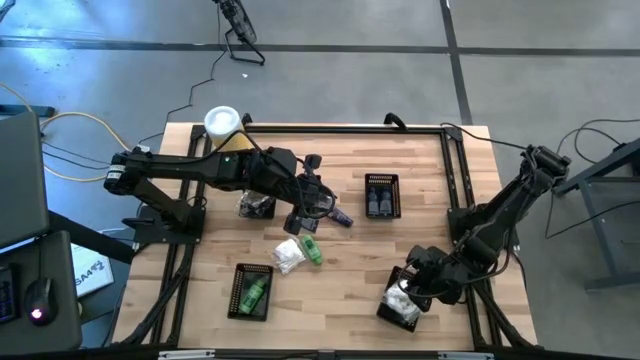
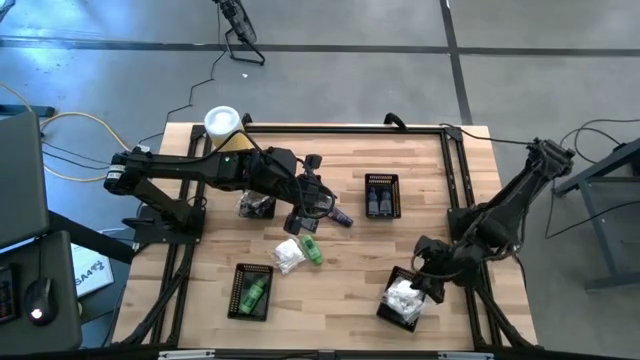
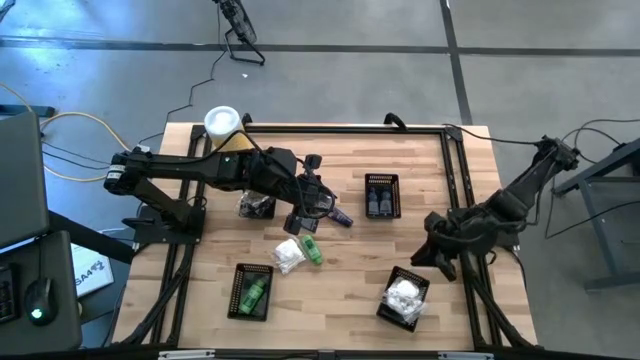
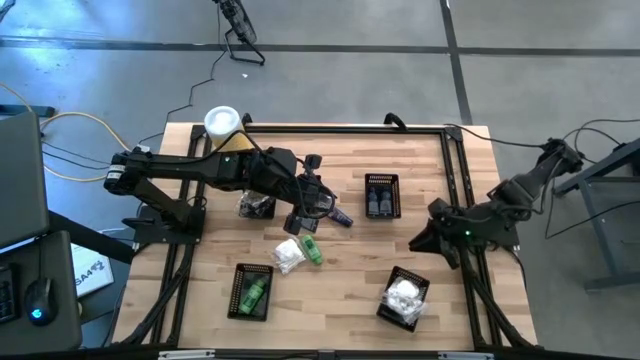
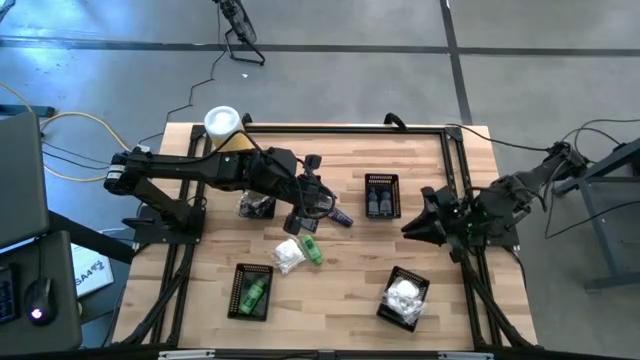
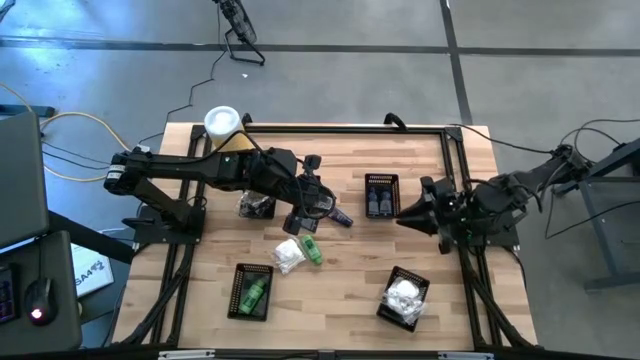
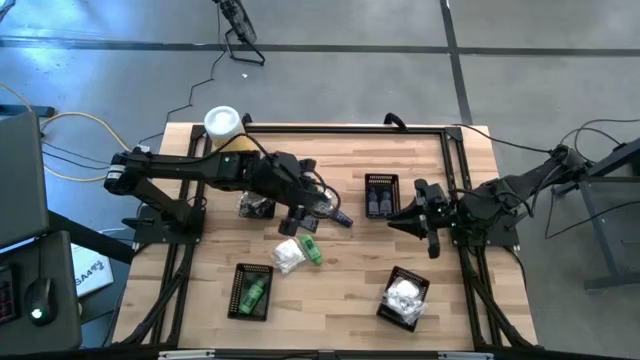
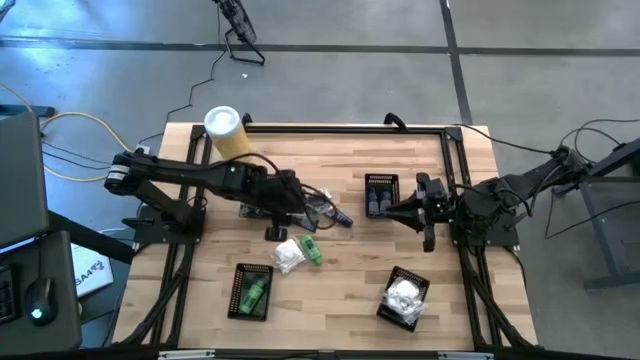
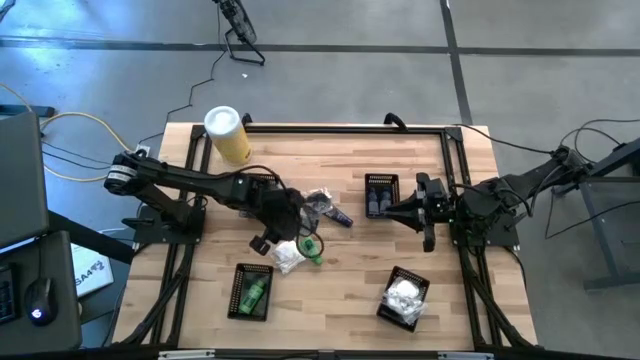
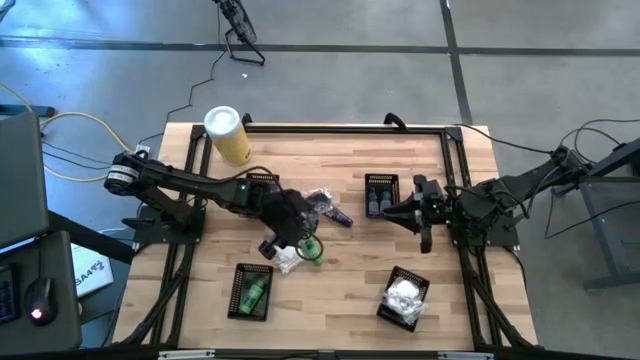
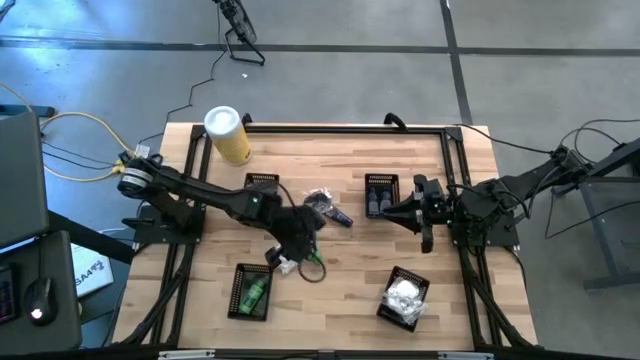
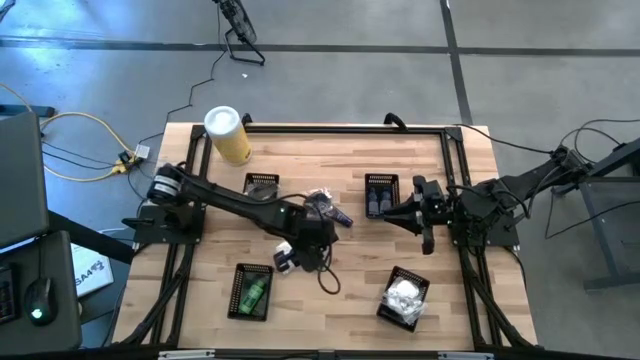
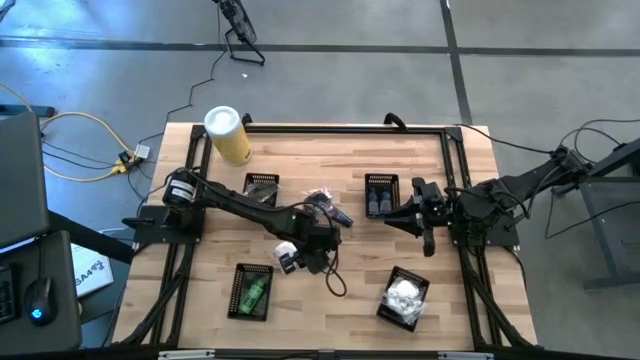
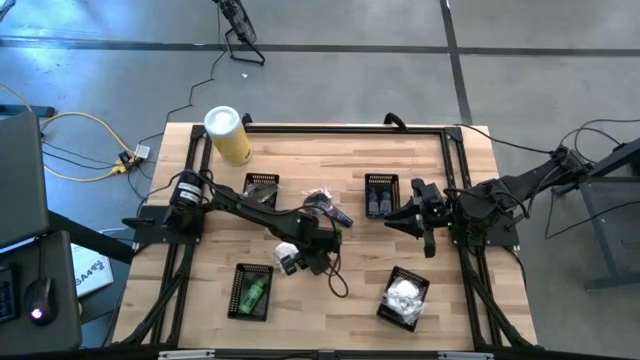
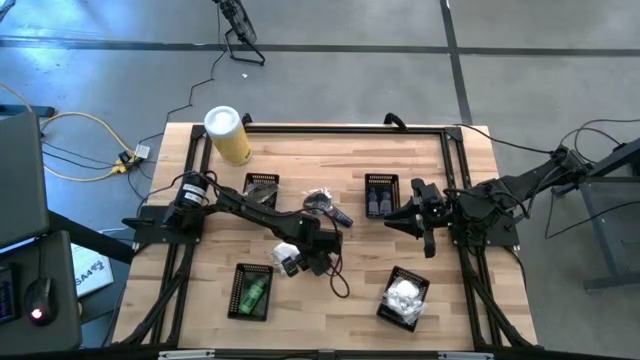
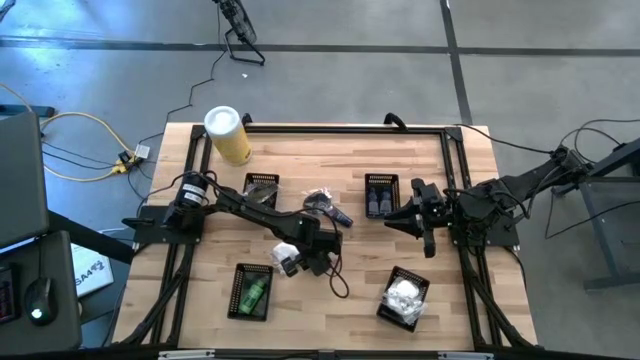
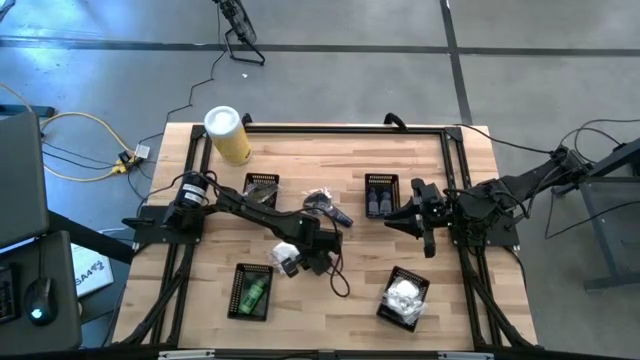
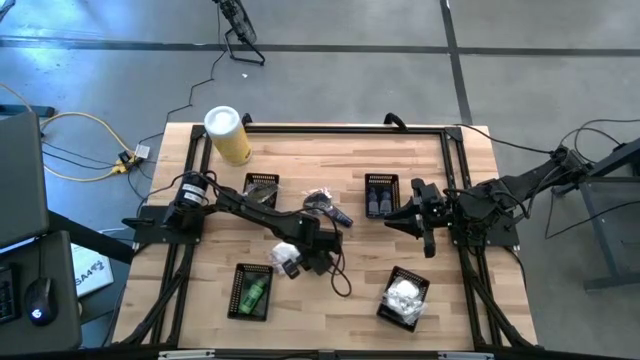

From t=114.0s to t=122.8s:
Task: Pick & Place Travel size toiletries
Put the green shampoo into the bottom left black basket

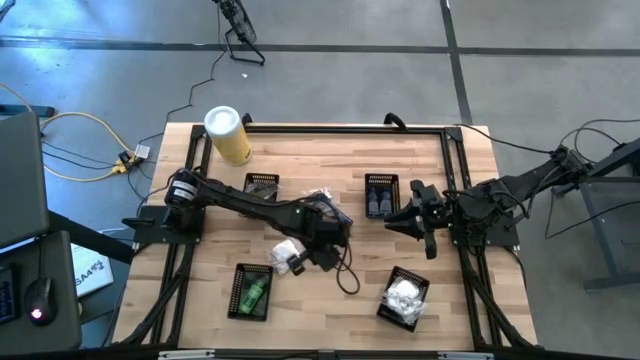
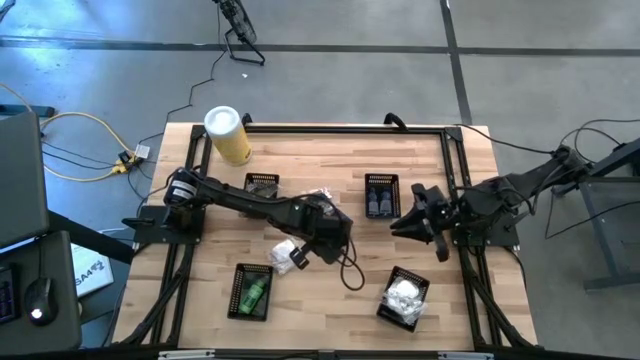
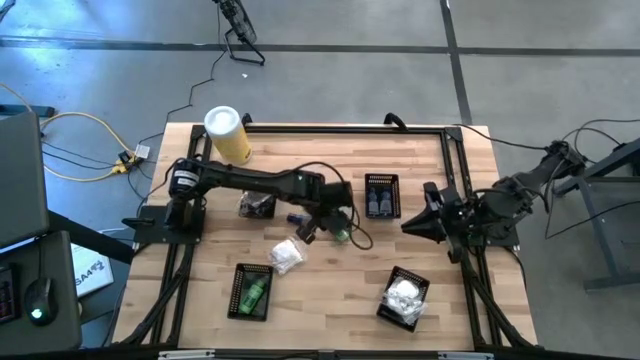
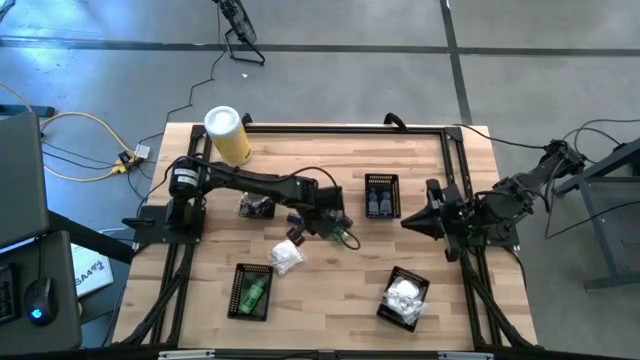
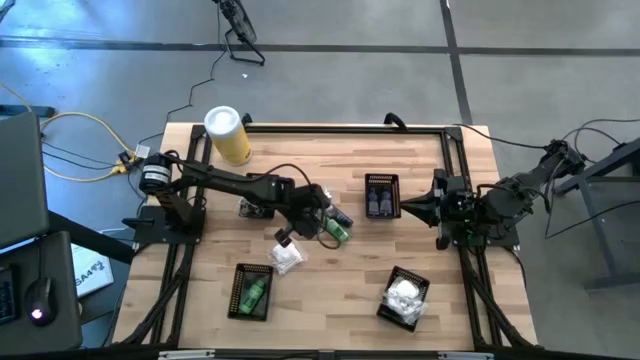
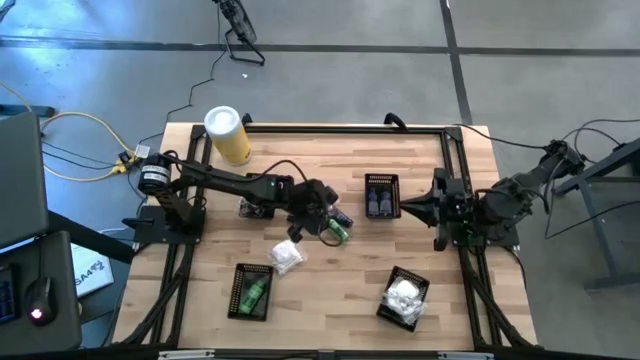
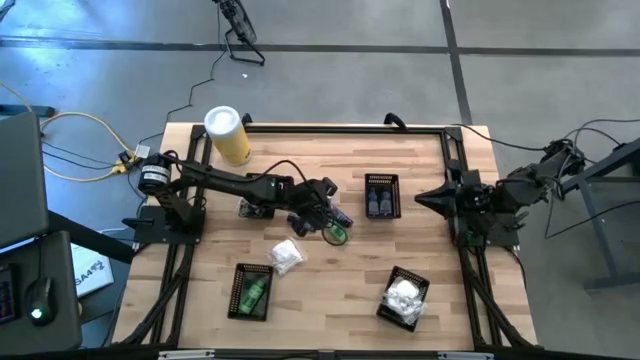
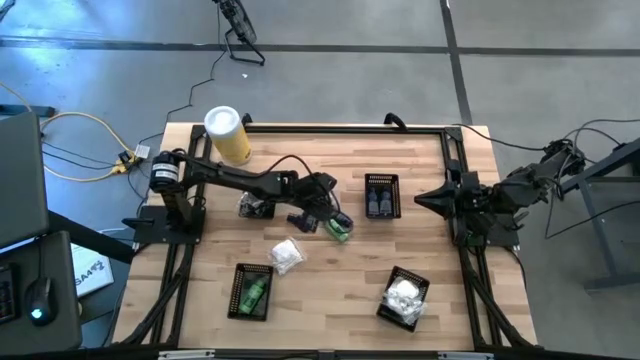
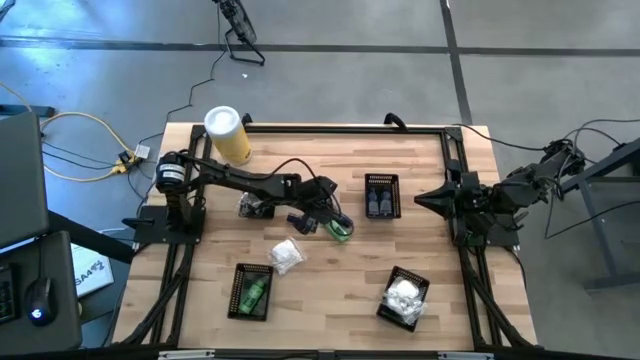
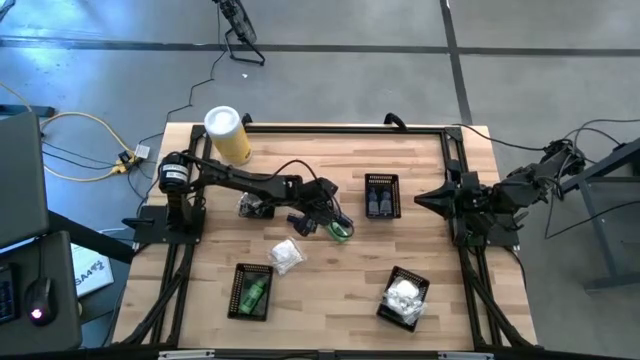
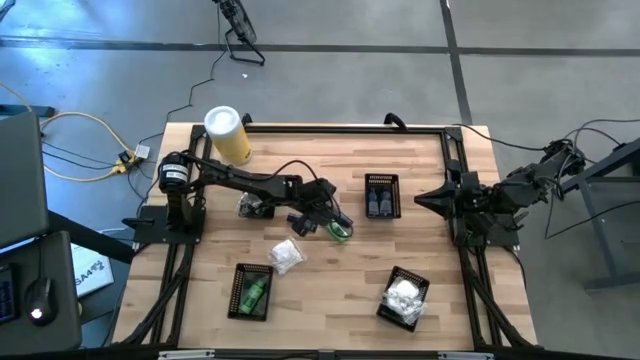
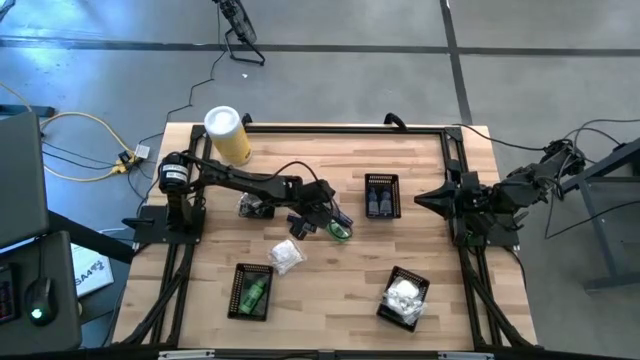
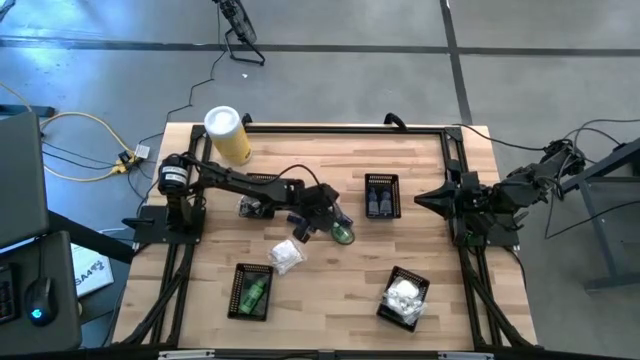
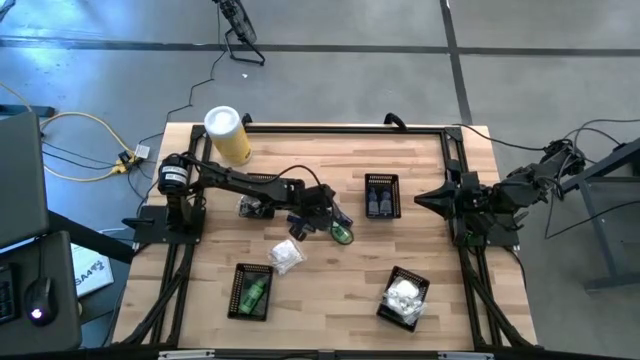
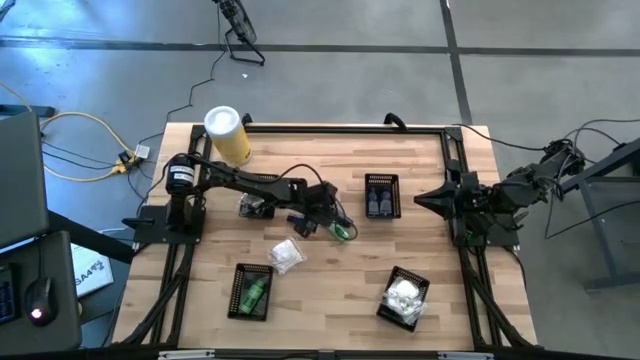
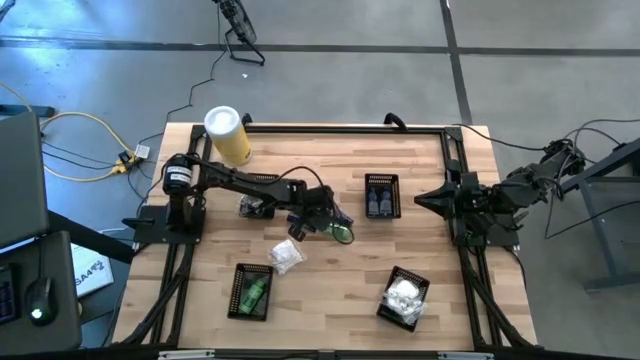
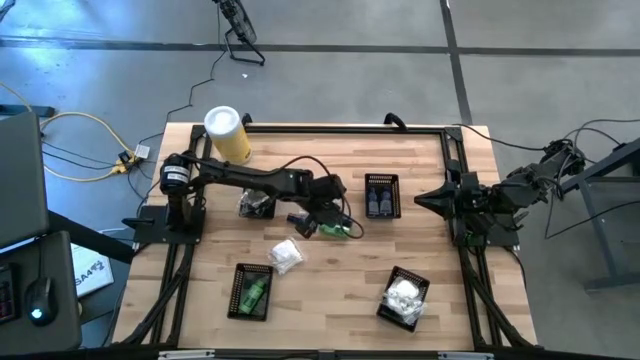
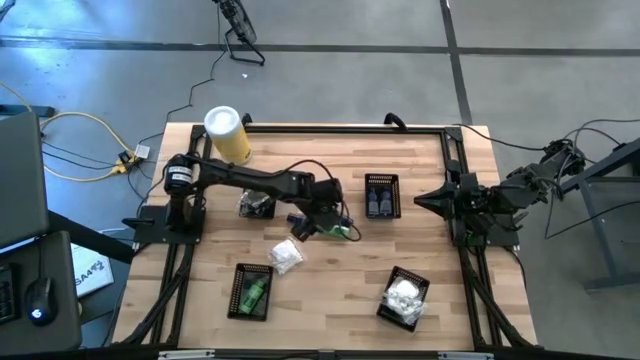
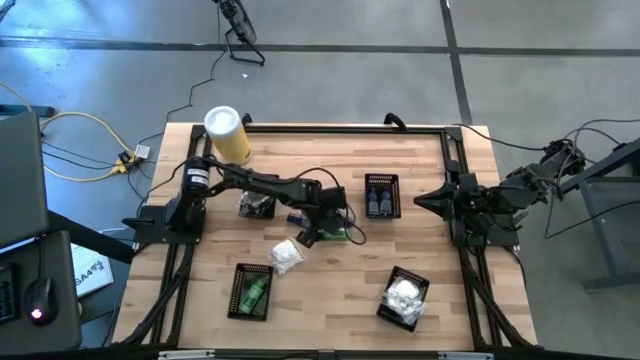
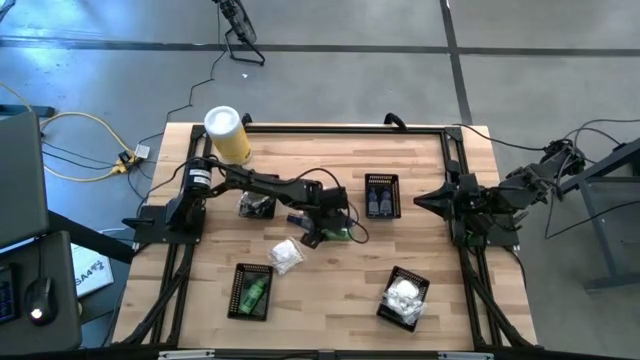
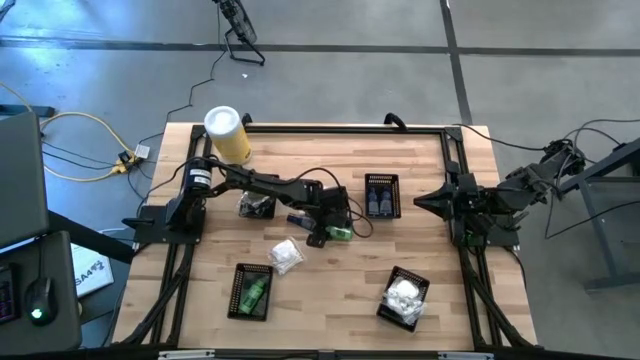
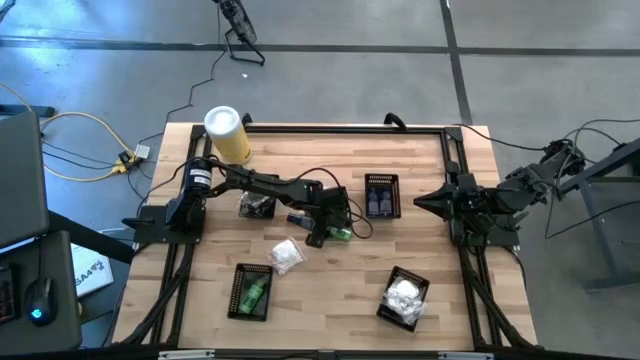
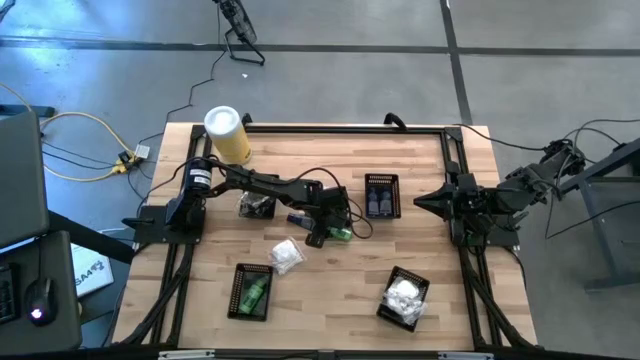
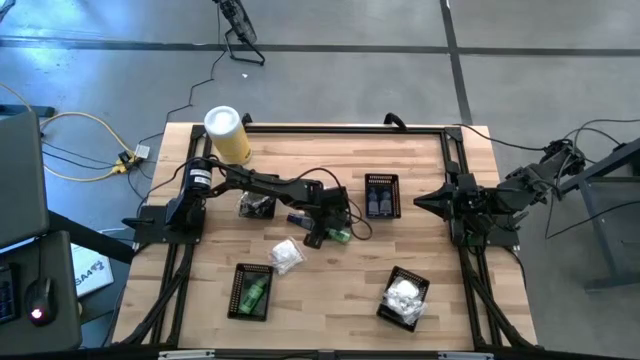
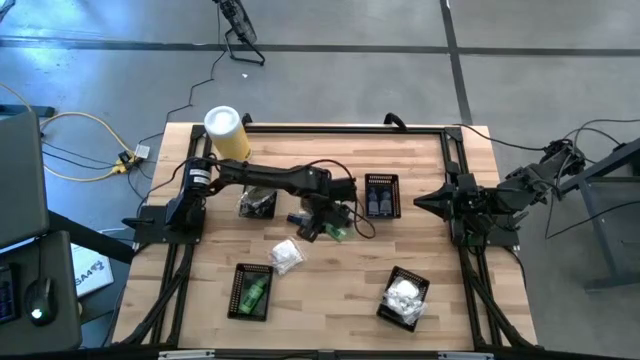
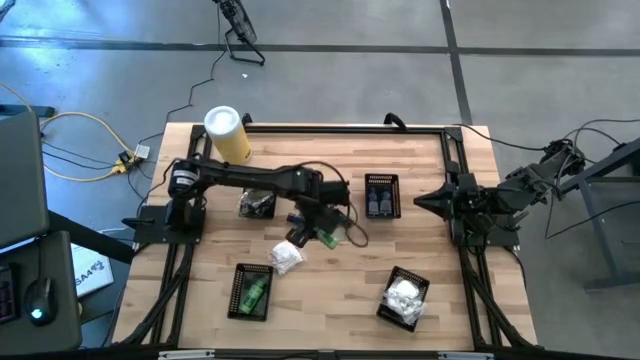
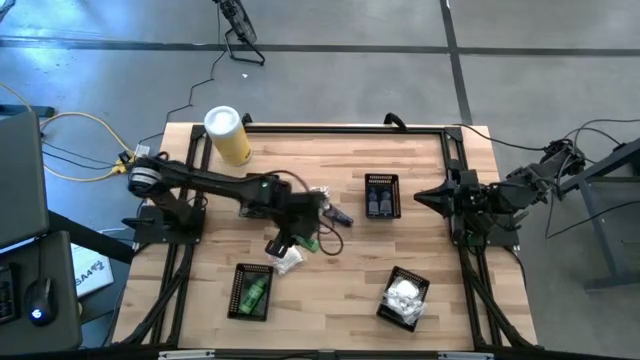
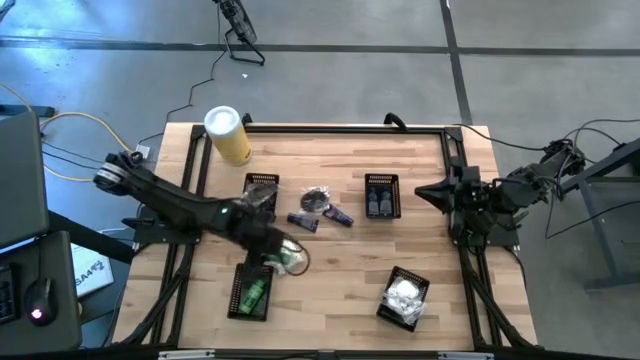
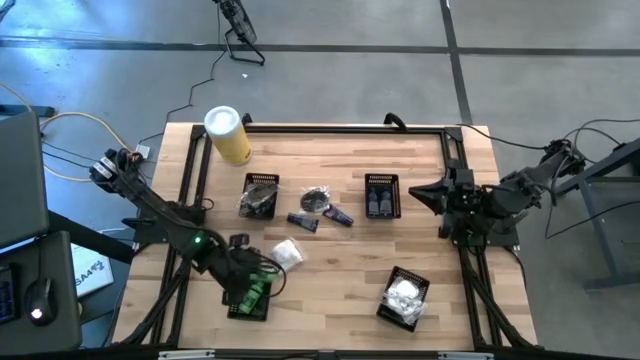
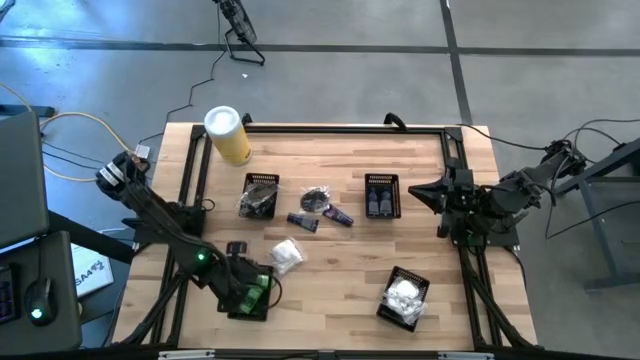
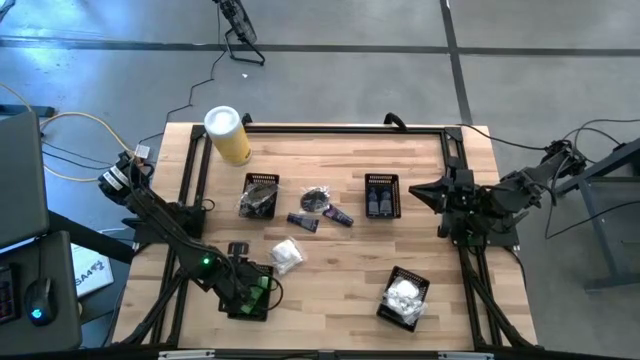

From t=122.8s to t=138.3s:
Put the green shampoo into the bottom left black basket
